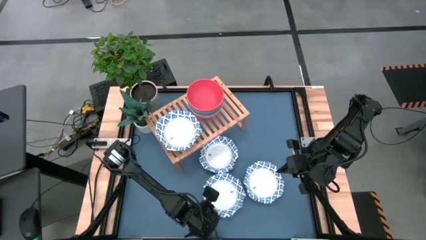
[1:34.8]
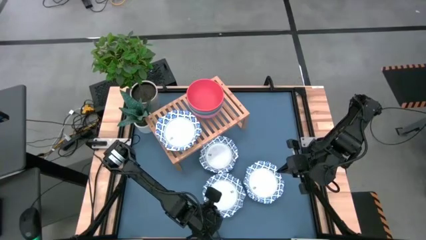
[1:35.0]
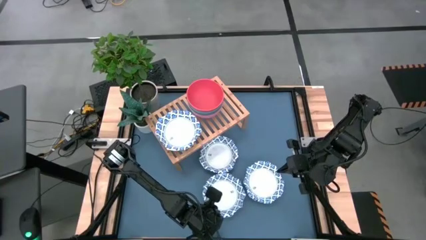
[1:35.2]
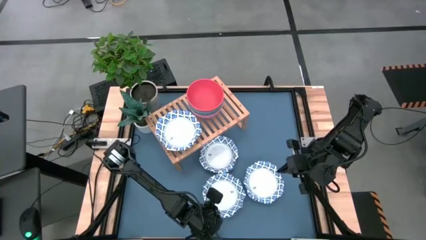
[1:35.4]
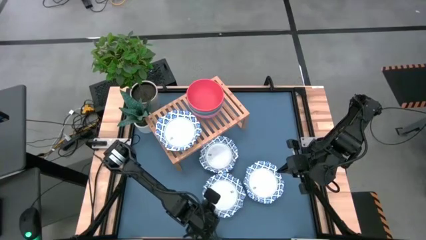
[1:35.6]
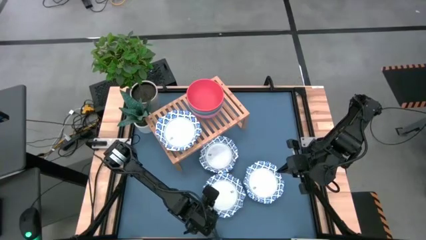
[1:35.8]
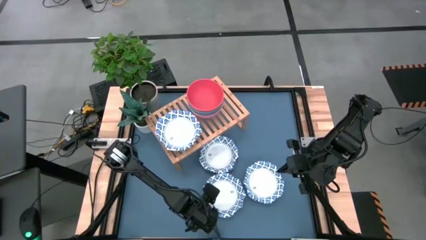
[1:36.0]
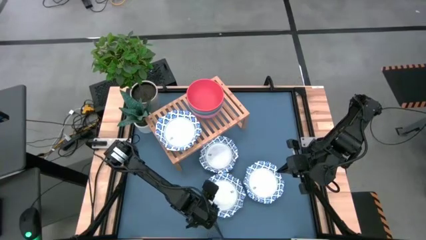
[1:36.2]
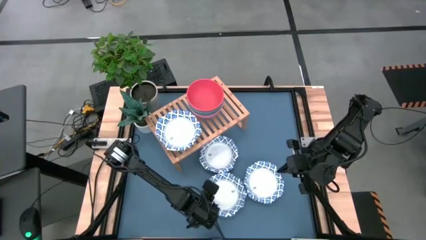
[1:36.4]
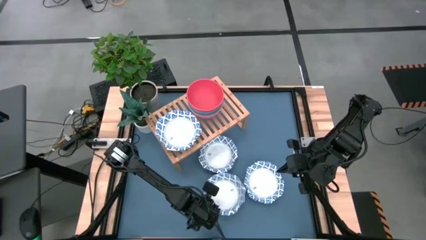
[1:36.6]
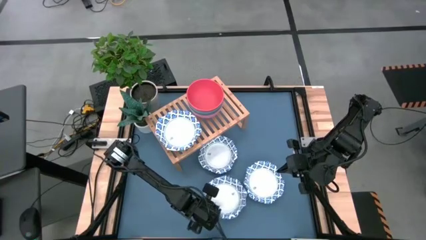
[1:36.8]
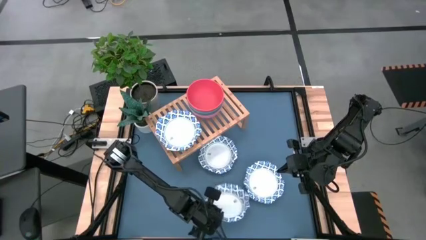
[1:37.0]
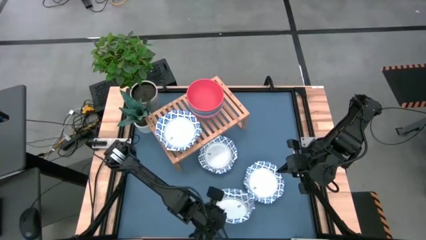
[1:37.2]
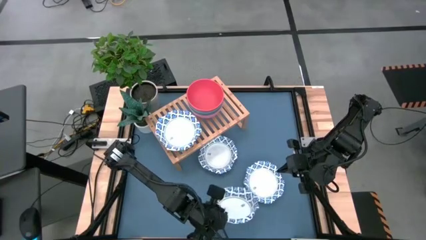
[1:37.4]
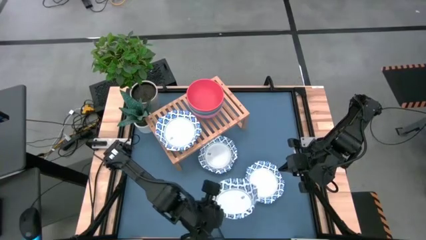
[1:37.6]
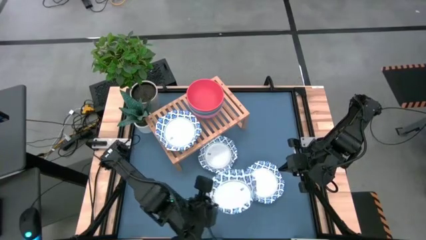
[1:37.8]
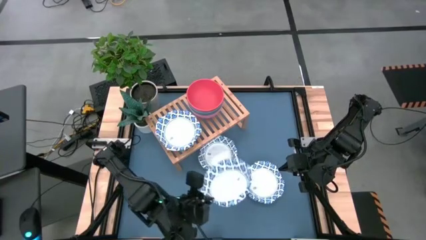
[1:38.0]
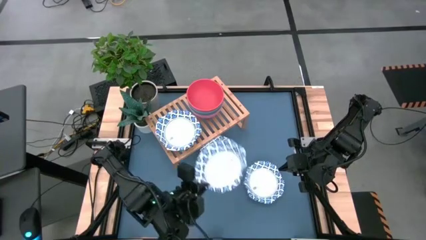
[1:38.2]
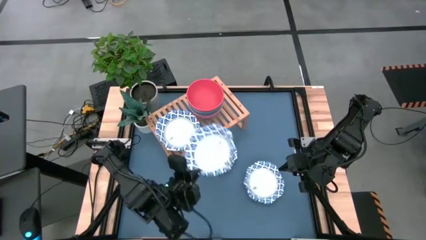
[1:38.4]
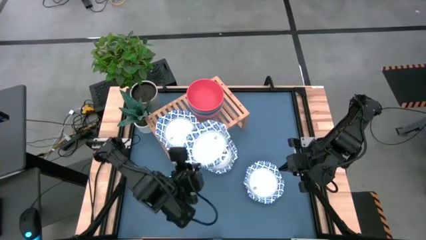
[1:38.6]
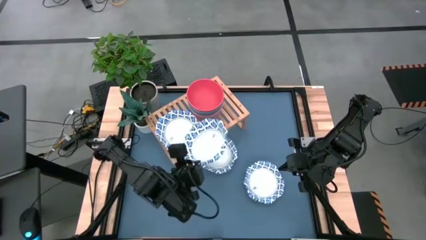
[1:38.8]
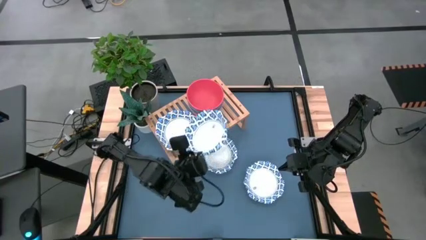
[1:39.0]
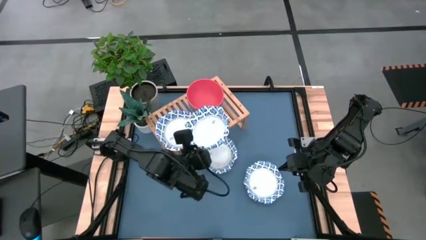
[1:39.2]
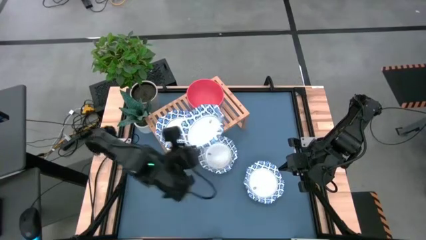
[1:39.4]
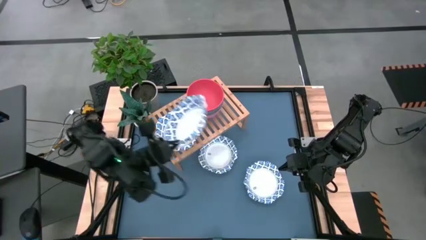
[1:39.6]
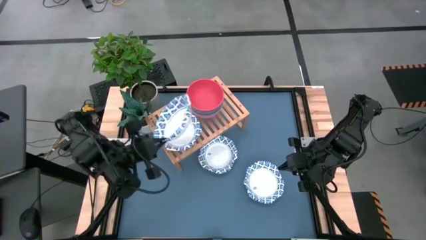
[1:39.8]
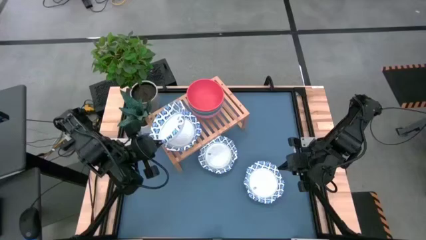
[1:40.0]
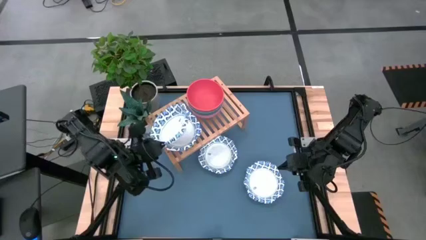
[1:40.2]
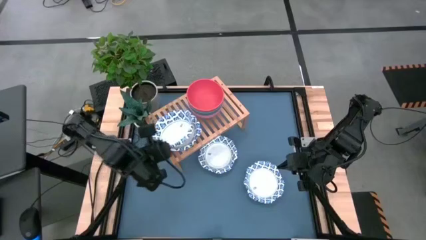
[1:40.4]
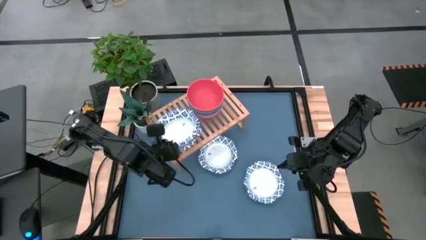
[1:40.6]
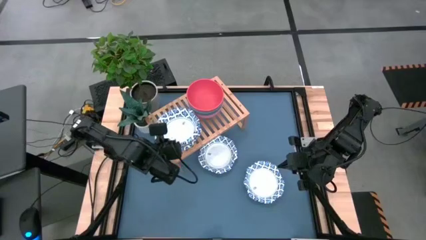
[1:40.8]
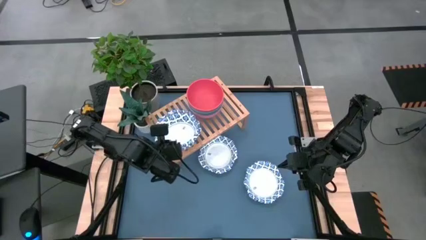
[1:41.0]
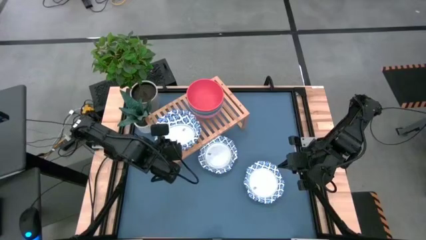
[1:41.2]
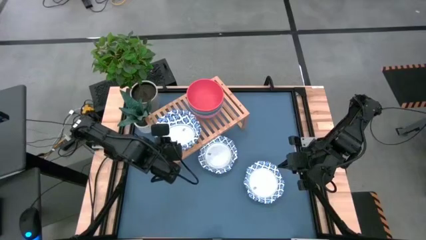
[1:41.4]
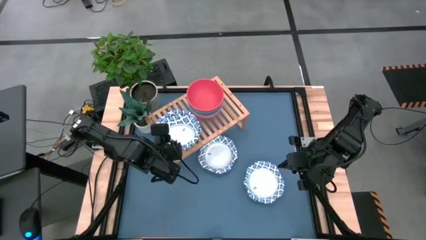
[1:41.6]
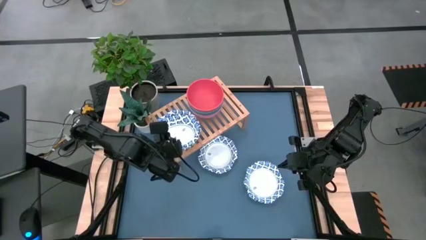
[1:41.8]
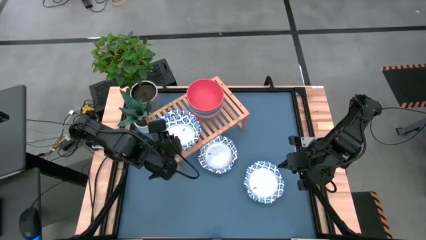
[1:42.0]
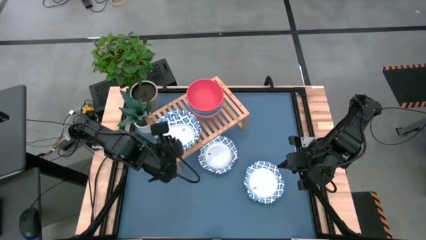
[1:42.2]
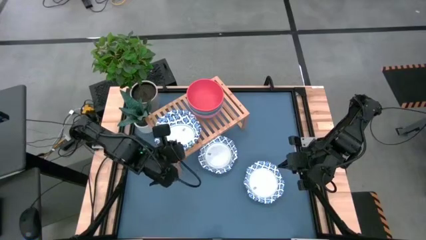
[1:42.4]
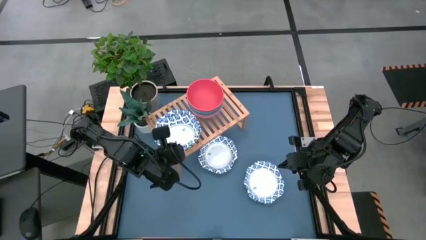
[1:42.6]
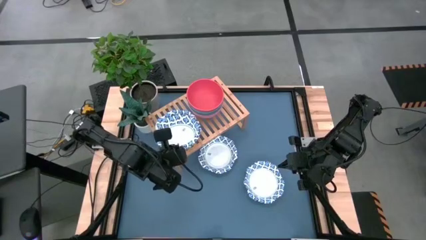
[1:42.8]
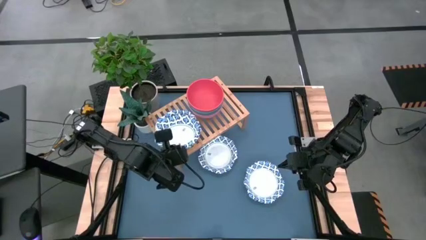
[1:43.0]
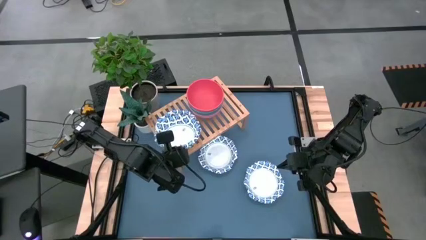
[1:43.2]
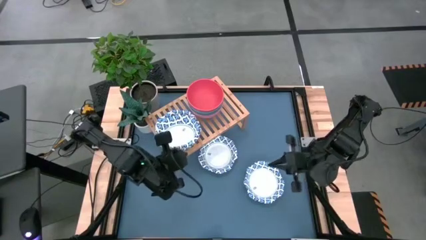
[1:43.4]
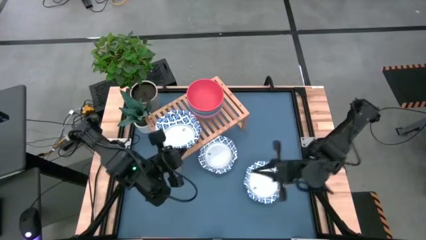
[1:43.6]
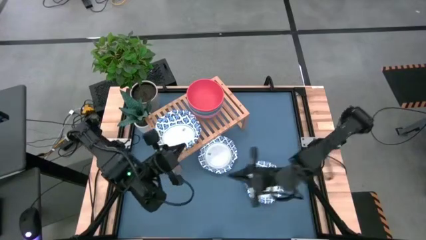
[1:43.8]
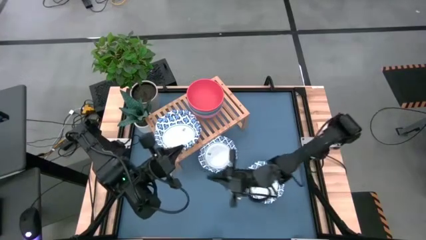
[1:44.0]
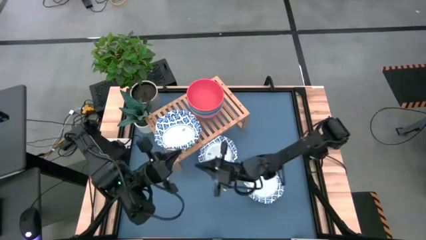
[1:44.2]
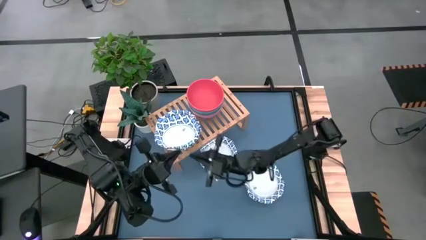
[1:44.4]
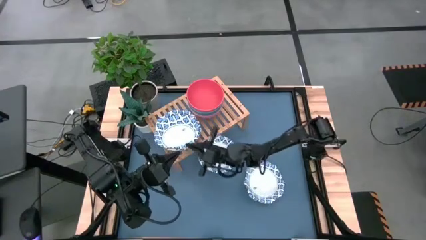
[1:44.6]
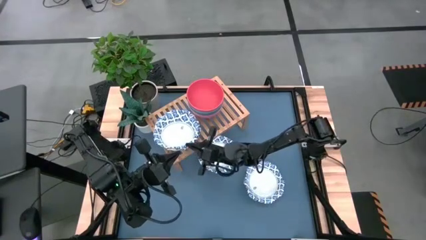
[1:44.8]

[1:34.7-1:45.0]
Task: Place and stack bowls onto a shelf
Stack the white patterned bowl on top of the other white patterned bowl on the shelf

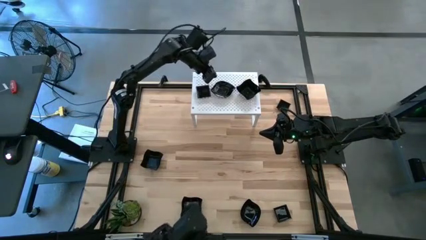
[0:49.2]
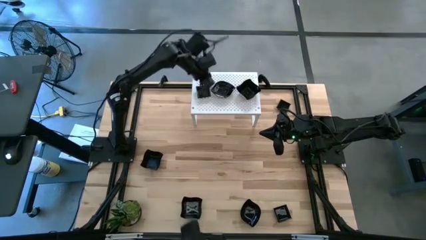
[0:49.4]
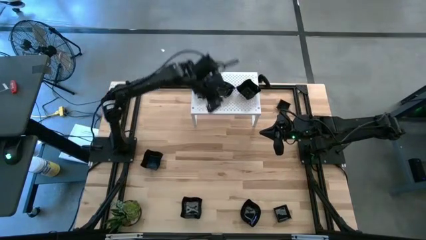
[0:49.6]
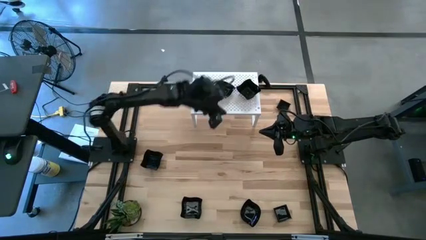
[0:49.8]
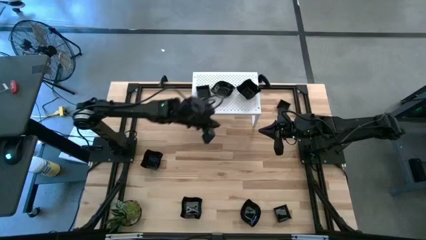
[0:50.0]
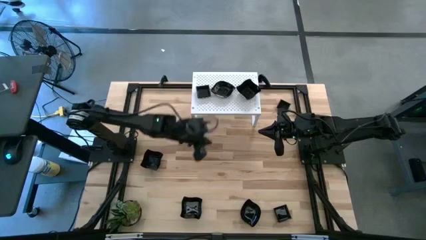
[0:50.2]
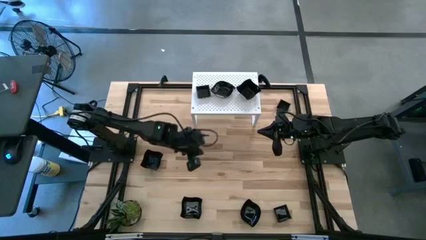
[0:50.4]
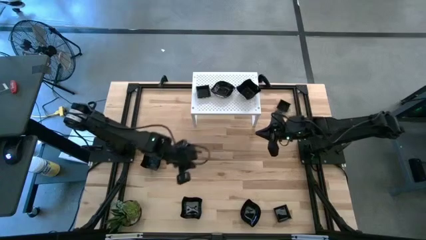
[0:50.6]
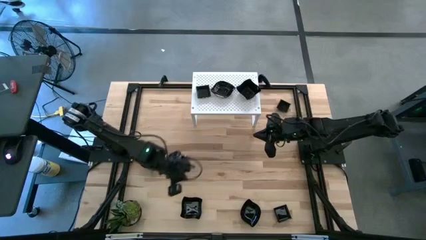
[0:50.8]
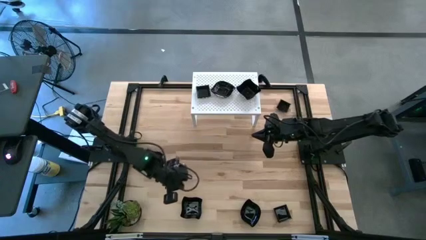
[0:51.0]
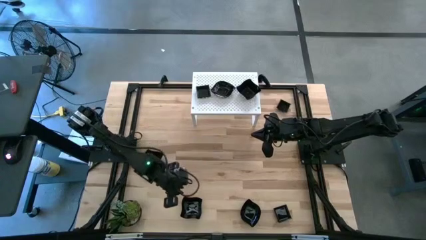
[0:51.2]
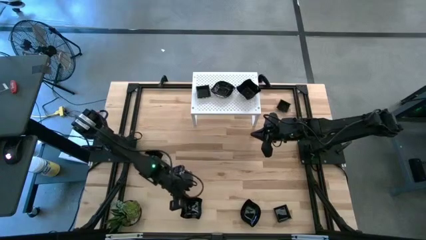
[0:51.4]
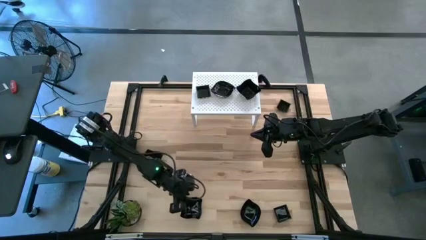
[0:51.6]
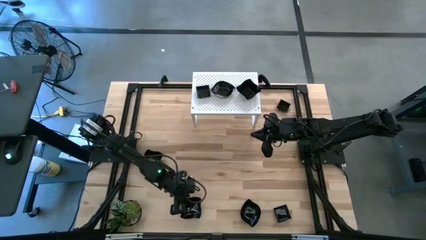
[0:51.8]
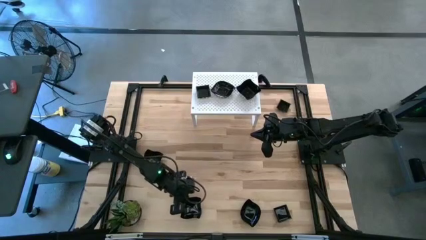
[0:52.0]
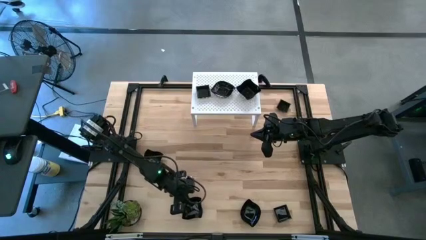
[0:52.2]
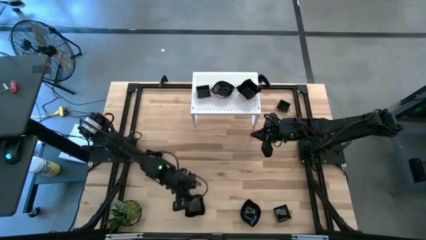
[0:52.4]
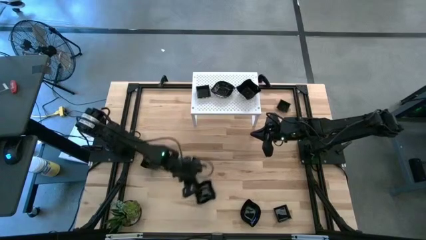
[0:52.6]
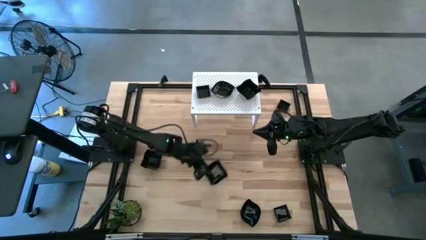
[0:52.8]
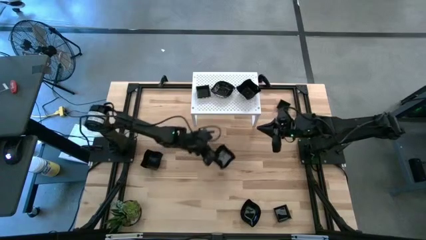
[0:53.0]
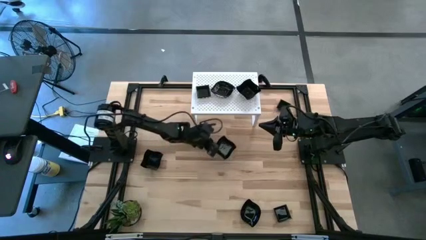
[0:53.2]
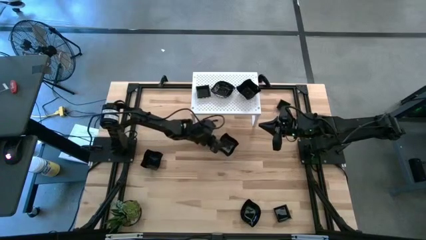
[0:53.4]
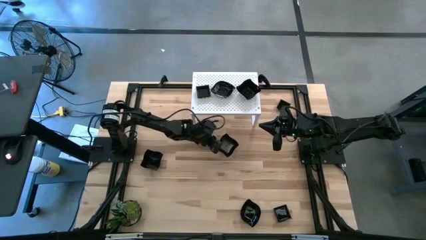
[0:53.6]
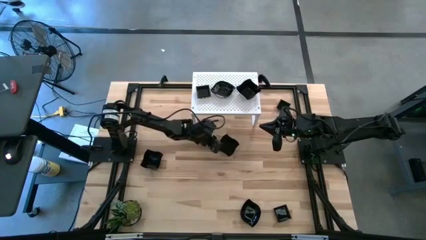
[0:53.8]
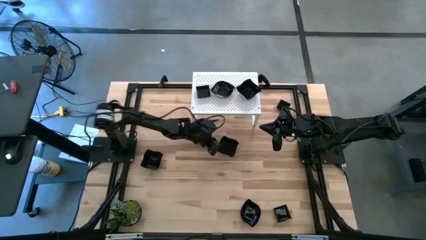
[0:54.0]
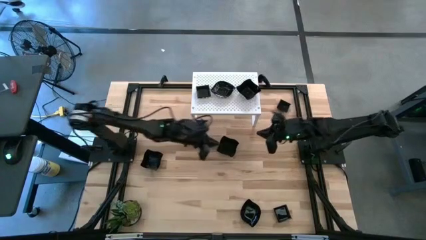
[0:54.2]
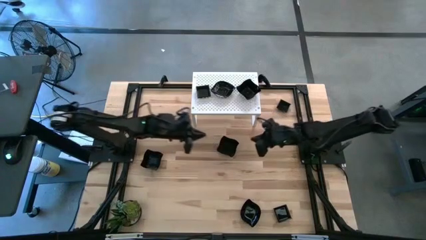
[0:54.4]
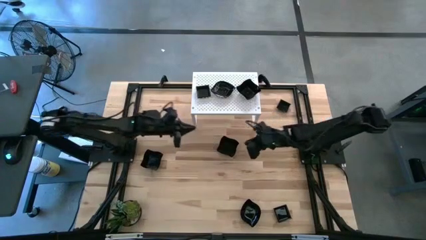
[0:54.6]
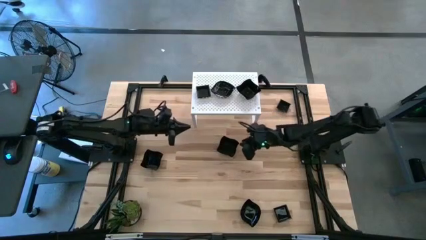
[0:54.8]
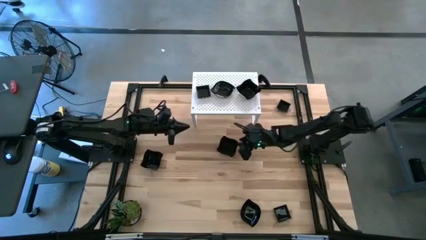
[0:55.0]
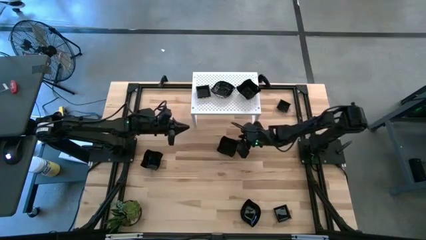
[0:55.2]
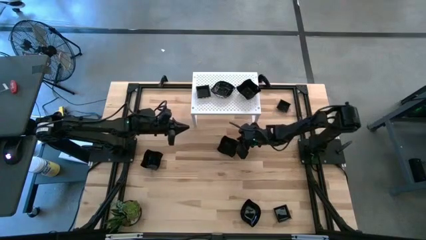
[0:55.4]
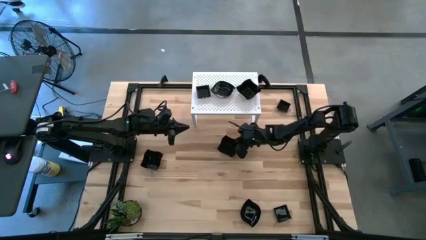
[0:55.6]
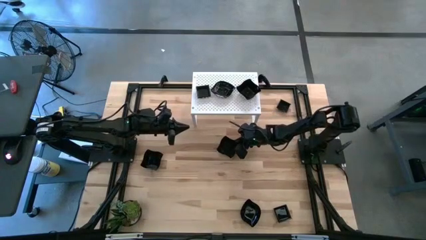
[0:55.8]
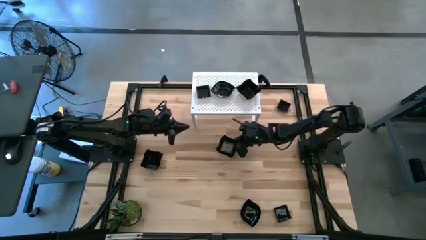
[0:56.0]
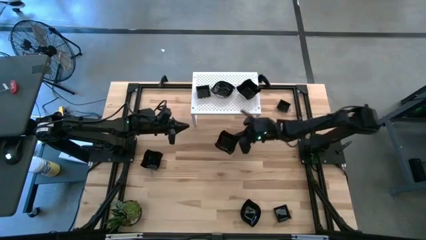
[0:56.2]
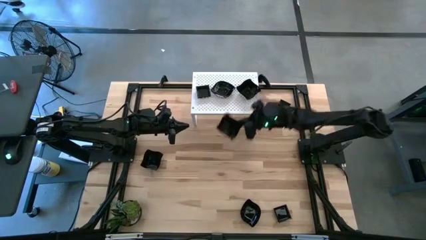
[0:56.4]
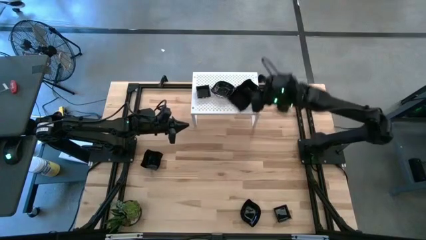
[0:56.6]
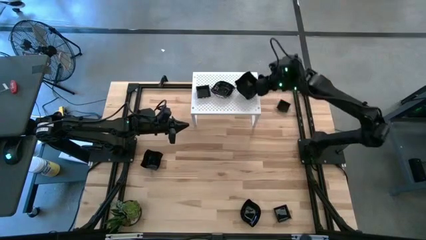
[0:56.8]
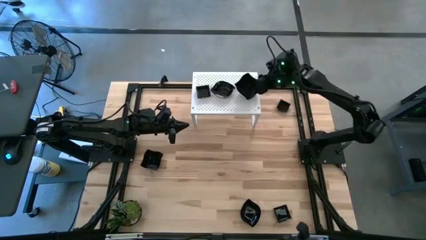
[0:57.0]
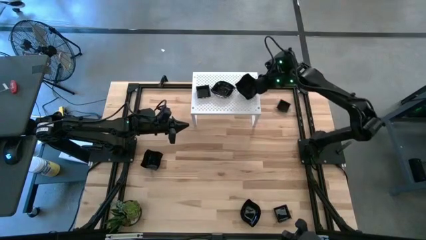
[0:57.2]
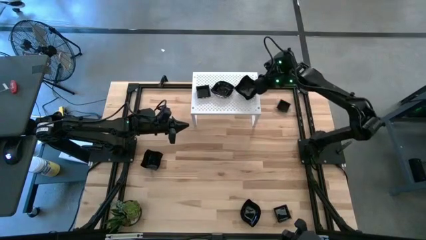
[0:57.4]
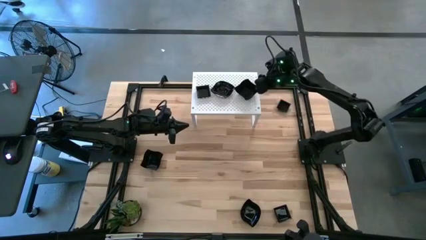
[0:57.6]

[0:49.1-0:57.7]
Task: Pick & Place Mini shaped plates
Stack the black distorted square plate on top of the black distorted square plates on the shelf
